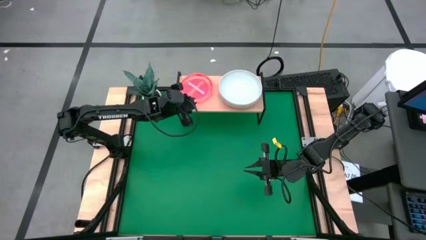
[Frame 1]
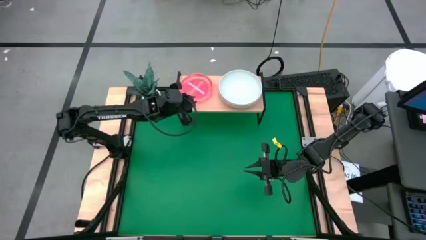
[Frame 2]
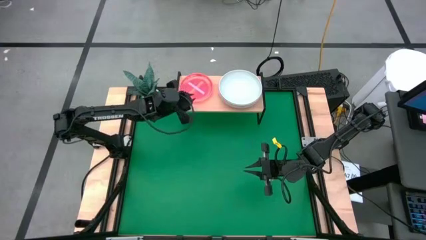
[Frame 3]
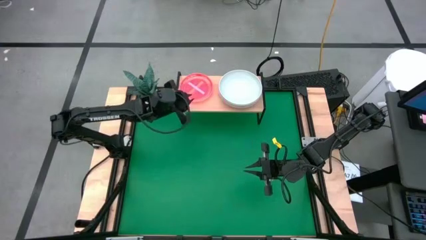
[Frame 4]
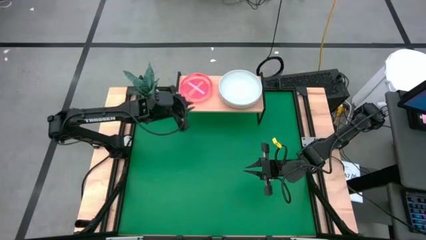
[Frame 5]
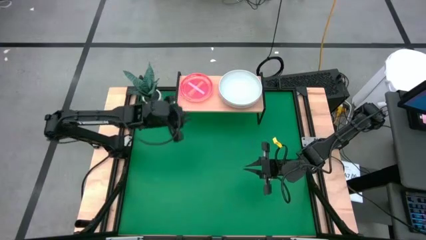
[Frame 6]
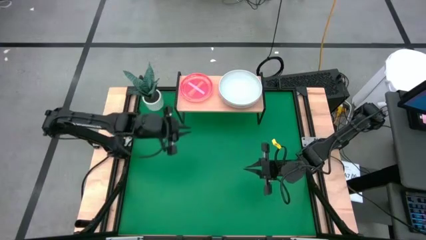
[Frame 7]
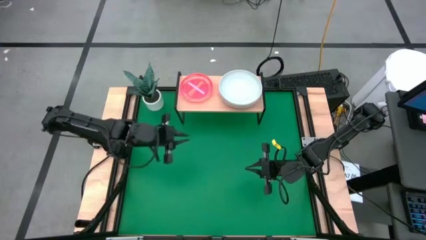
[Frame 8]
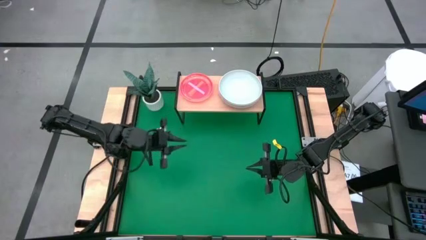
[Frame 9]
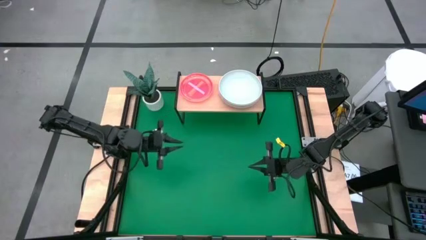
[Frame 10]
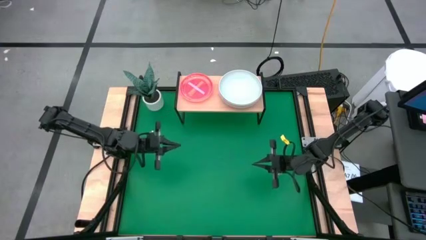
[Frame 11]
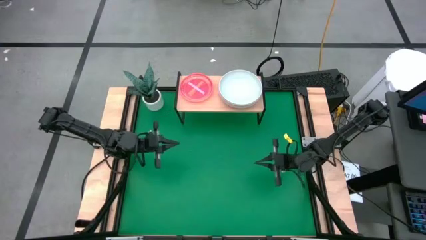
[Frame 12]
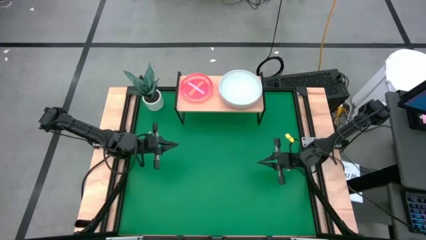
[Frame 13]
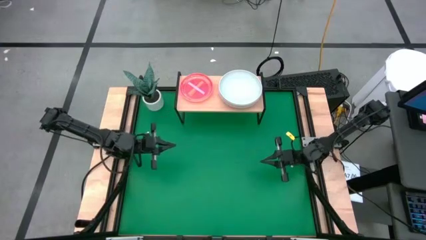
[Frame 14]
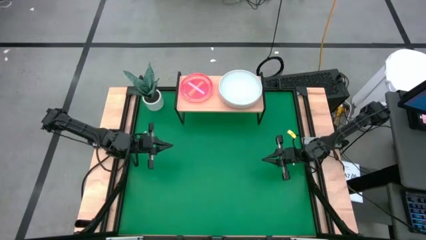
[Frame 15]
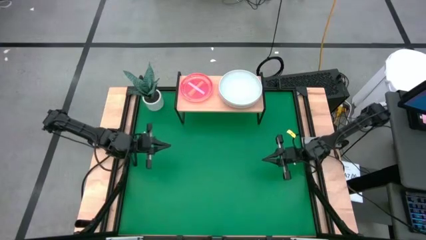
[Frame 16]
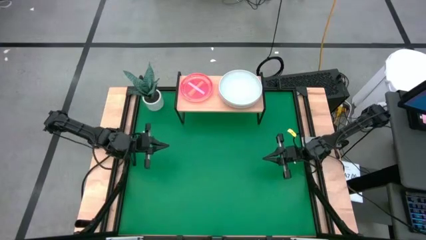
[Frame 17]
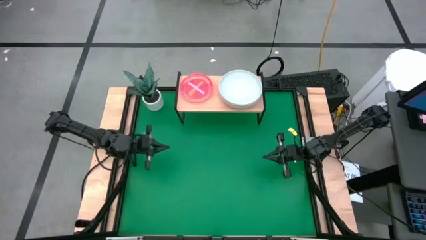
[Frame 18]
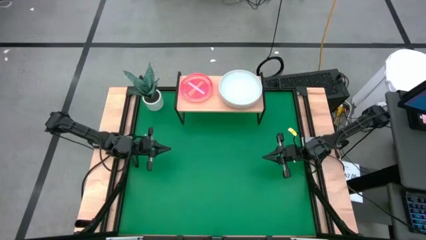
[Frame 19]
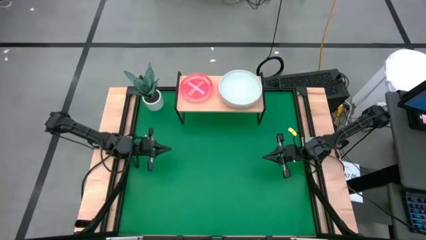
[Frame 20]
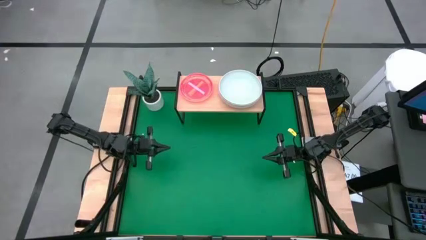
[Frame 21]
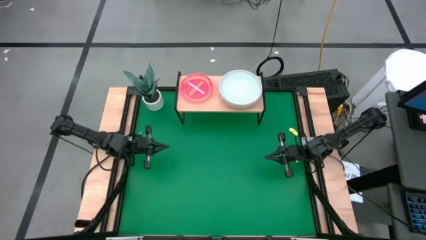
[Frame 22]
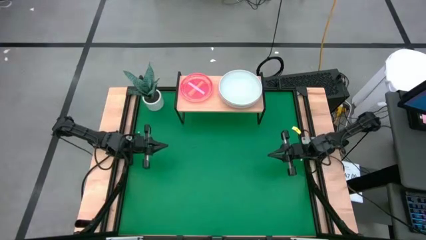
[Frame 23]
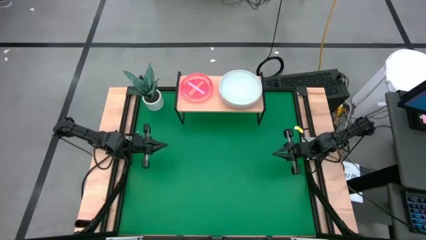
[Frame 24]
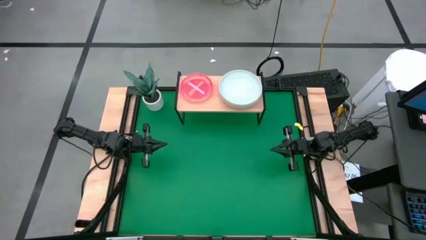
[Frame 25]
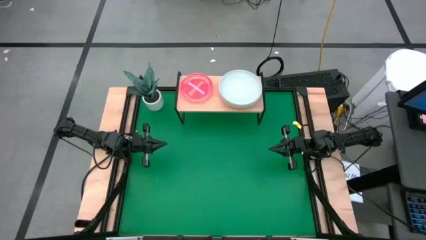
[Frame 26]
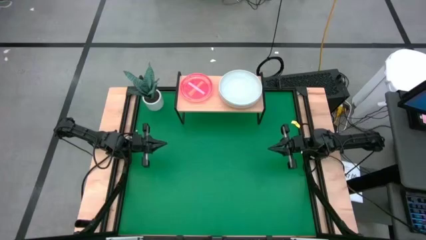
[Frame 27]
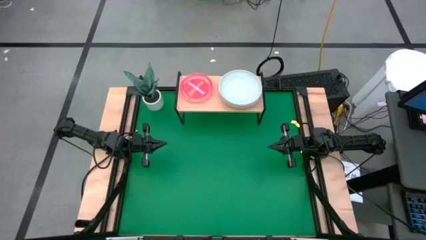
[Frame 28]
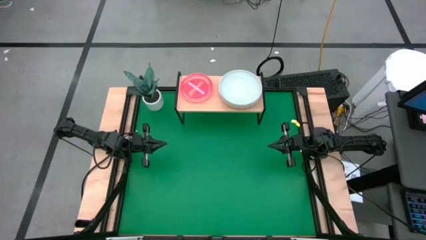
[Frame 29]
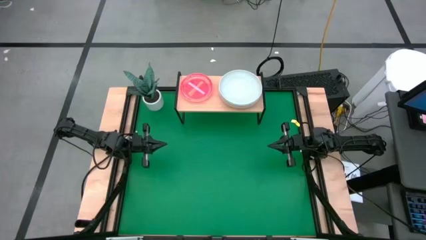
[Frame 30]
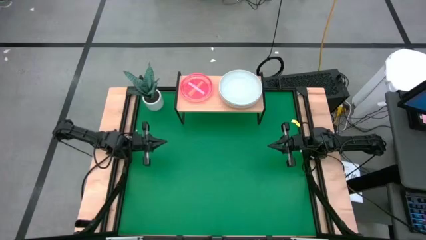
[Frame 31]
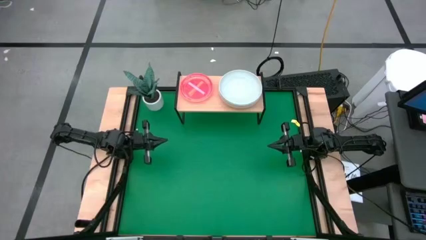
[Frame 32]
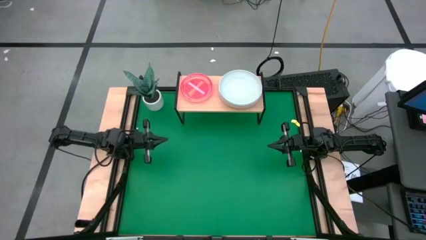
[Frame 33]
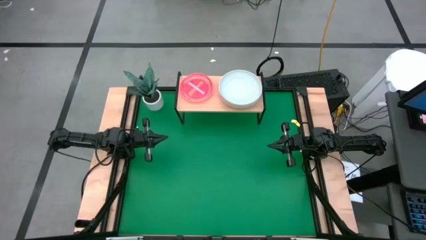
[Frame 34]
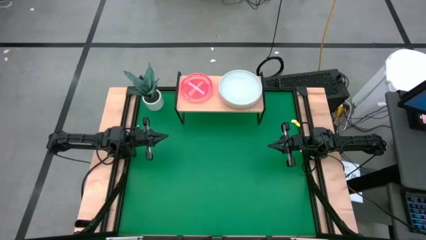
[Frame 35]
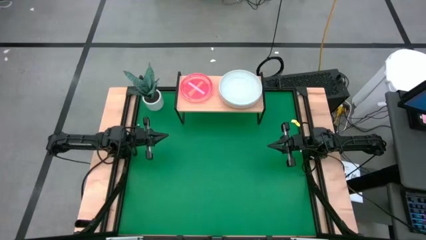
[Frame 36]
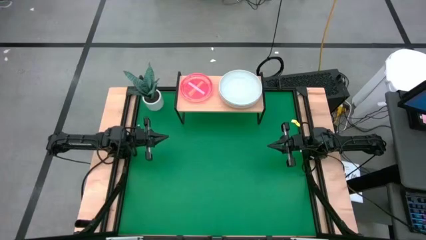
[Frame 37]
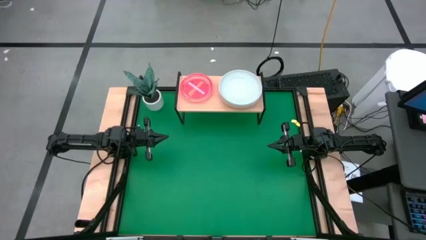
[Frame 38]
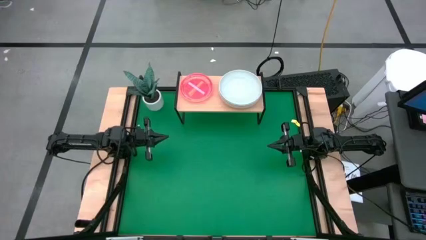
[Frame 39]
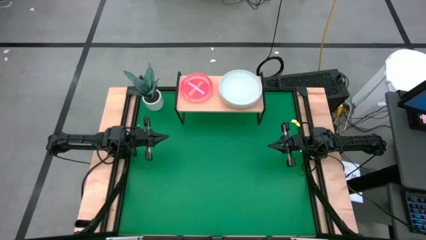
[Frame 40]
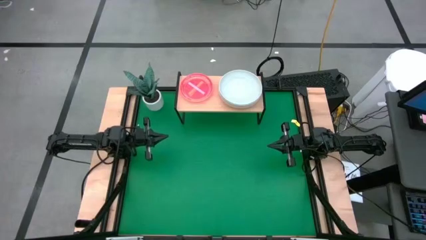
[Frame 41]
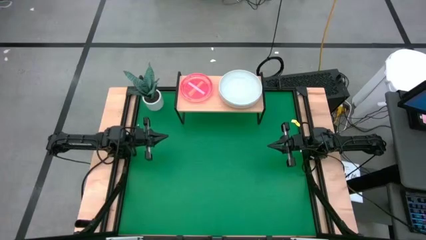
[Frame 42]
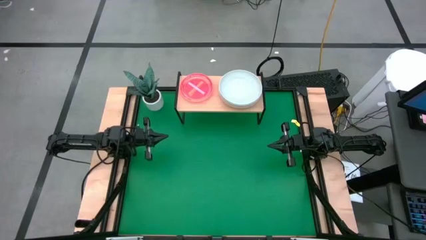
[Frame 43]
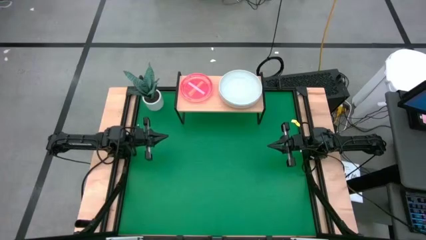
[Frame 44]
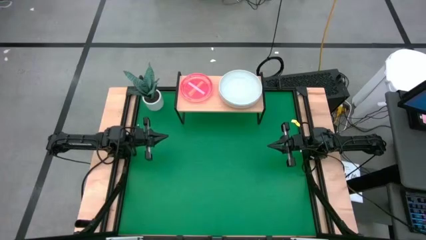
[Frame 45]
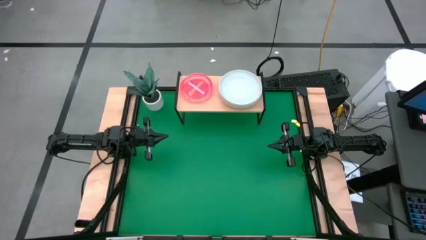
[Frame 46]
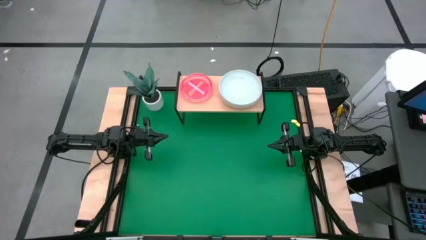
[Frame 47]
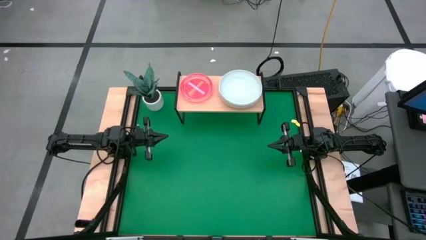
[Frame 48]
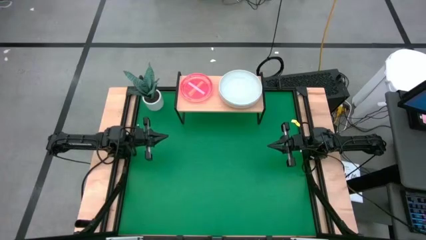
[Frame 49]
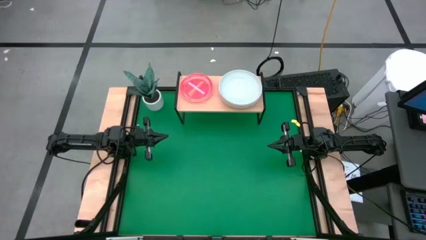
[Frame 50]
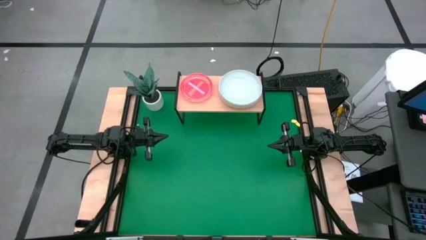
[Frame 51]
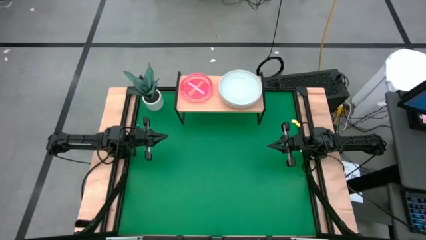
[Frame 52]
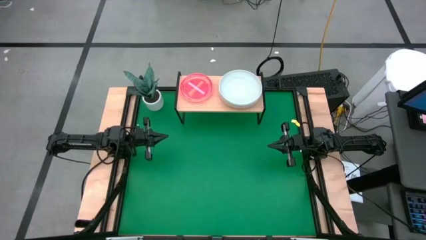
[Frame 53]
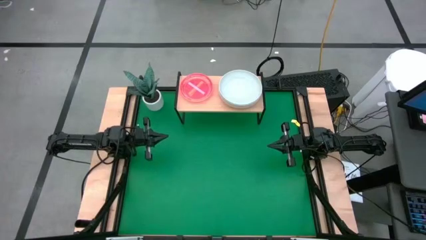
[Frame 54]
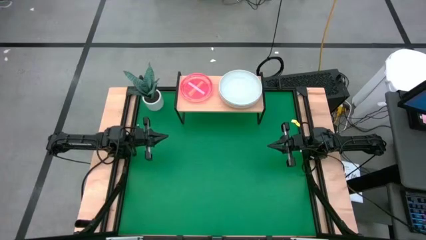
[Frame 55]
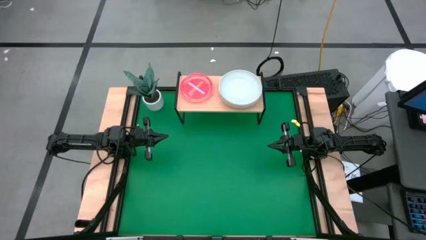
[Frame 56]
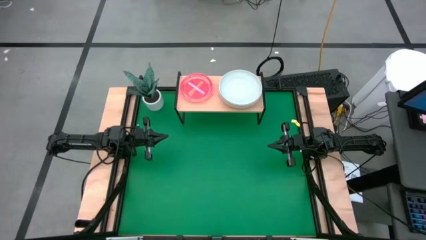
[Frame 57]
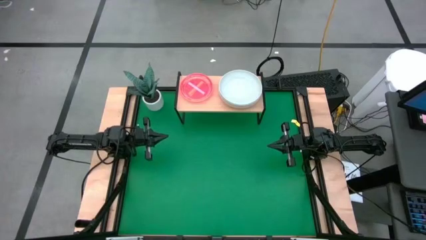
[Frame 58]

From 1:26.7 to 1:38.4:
Task: Place and stack plates onto a shelf
Return to Home Position

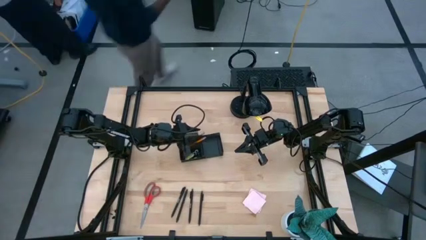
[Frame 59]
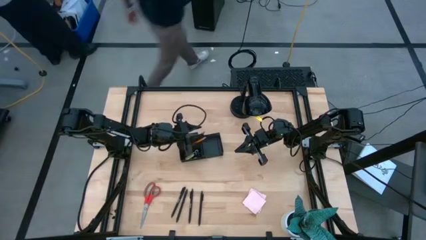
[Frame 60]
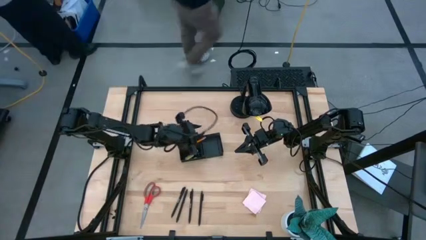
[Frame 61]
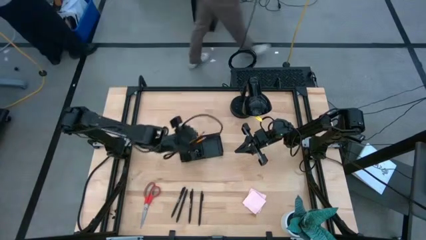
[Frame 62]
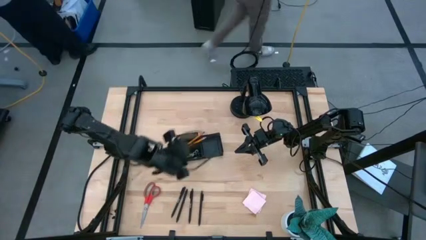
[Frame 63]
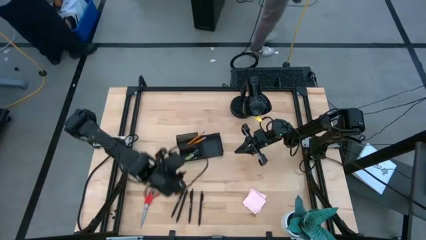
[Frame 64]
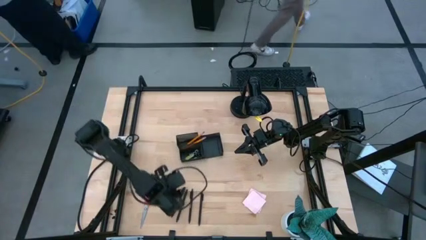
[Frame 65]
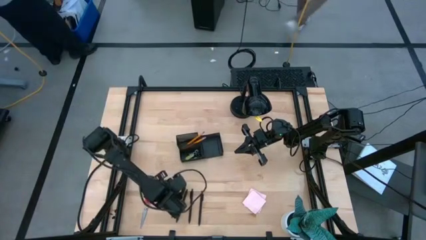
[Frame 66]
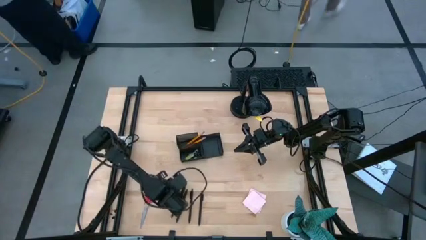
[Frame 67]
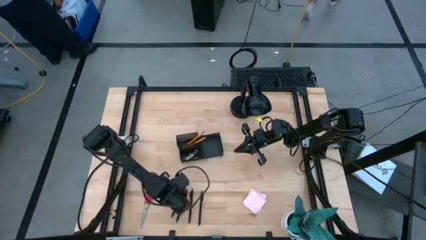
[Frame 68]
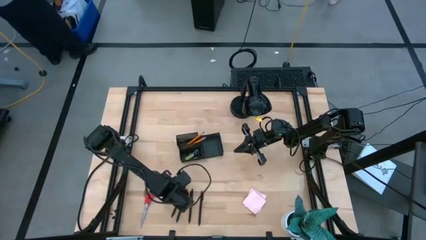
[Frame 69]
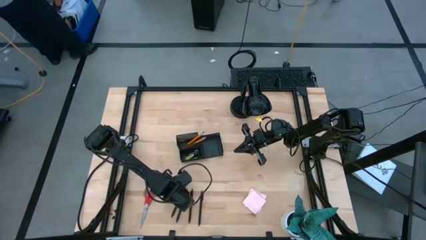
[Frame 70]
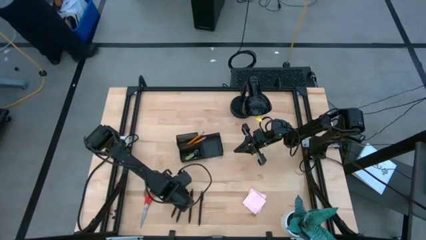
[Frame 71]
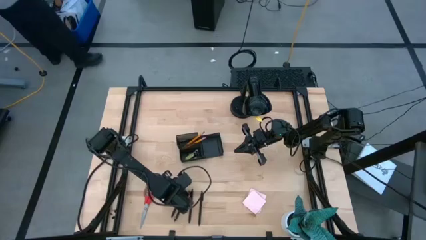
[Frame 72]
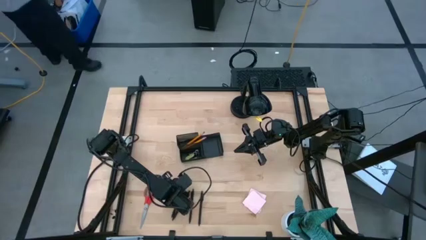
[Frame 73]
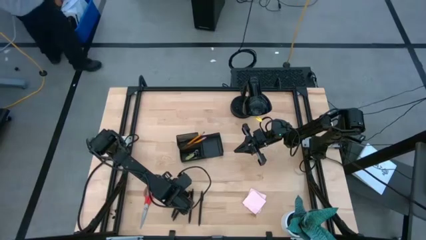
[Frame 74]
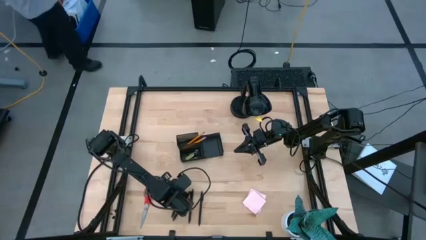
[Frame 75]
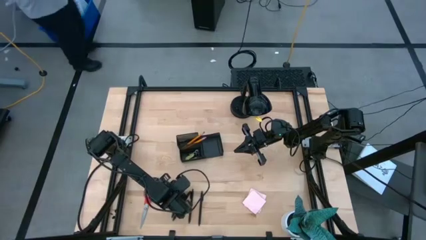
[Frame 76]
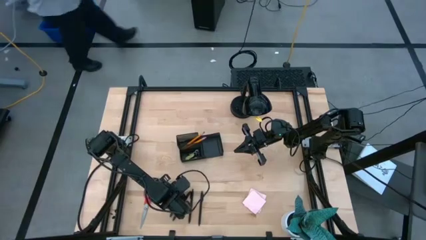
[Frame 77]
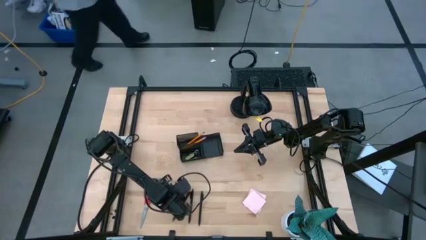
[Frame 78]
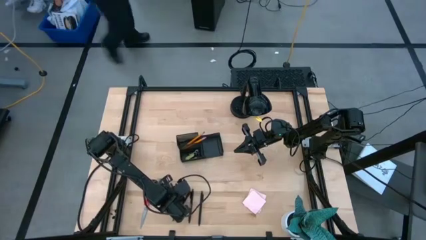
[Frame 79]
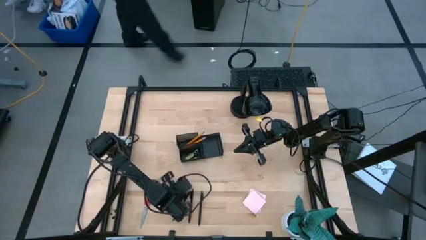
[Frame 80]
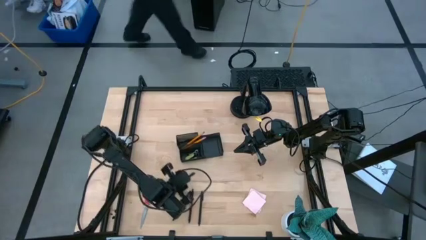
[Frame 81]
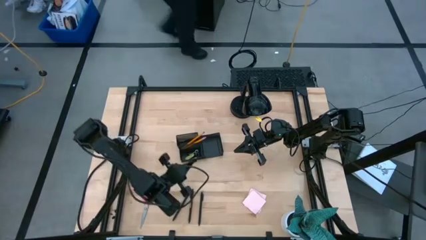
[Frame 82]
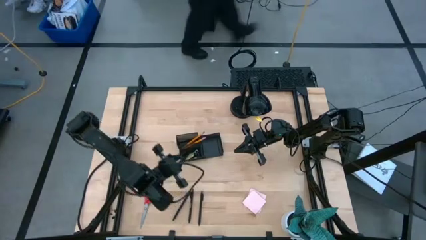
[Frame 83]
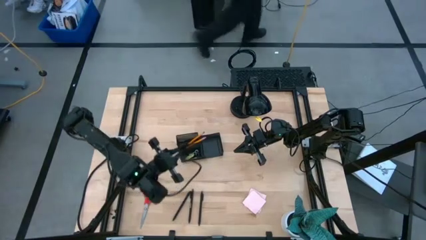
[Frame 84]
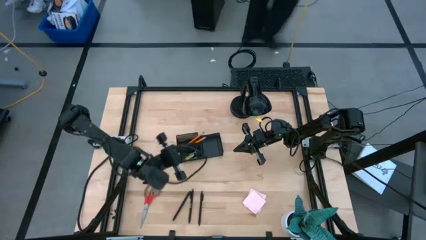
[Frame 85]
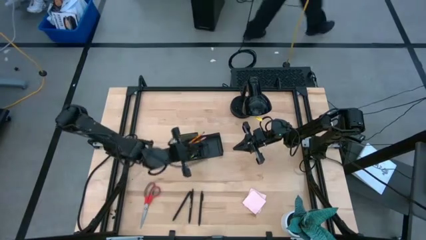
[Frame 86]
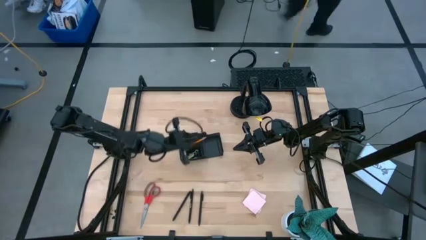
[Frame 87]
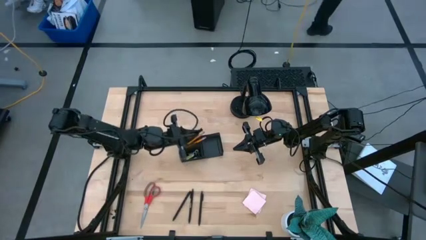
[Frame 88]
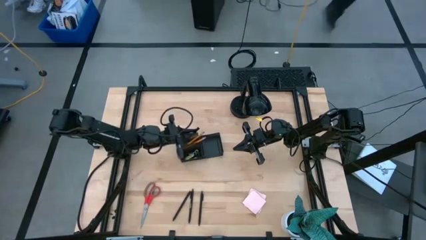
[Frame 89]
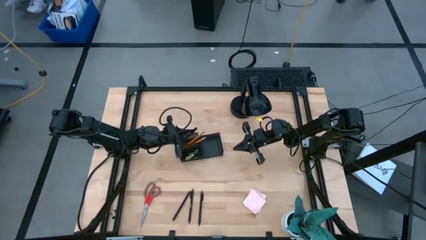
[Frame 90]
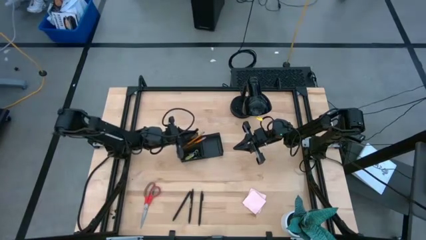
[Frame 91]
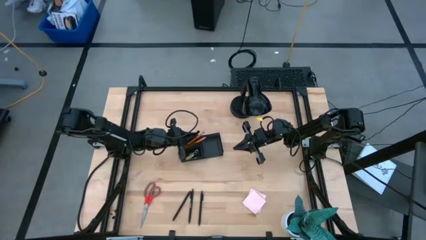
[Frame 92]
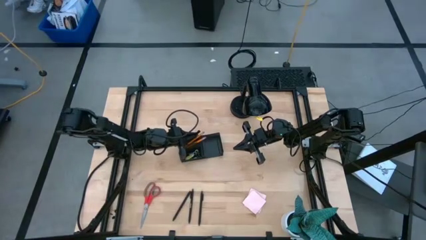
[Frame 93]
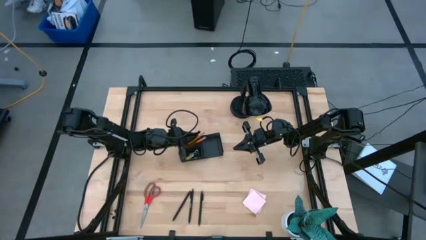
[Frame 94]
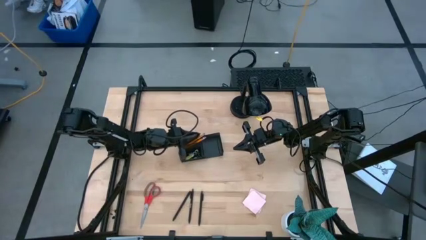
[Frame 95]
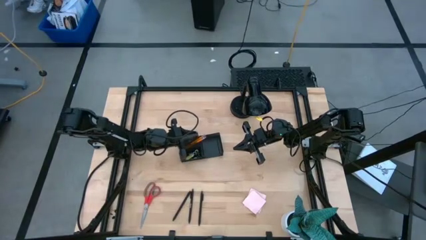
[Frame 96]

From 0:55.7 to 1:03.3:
Task: Pick and place office supplies into organizer
Put the black pen into the black desk organizer
